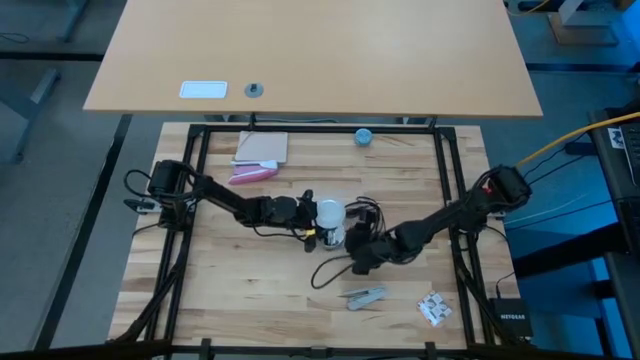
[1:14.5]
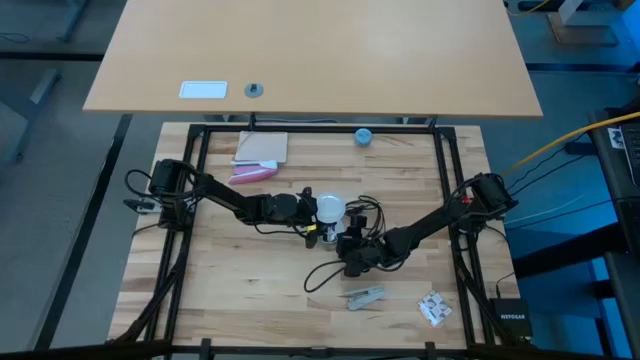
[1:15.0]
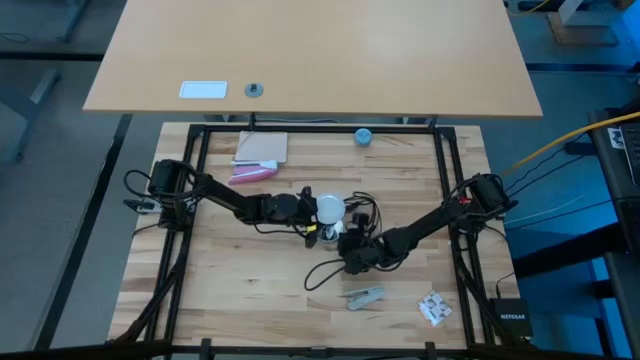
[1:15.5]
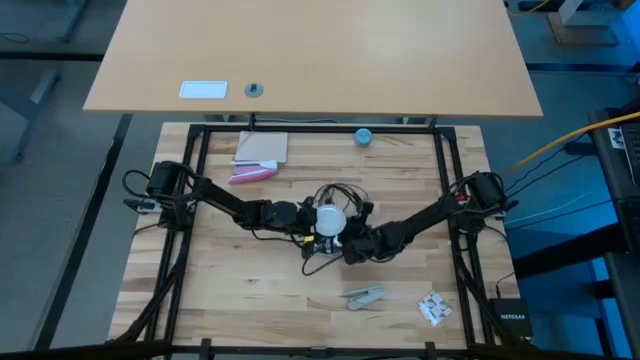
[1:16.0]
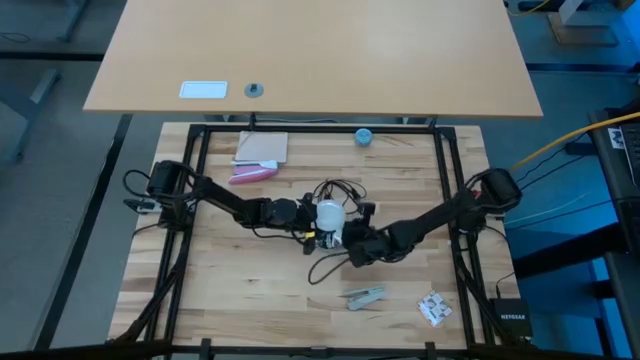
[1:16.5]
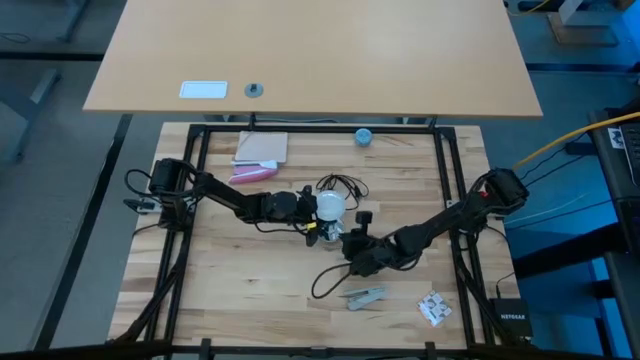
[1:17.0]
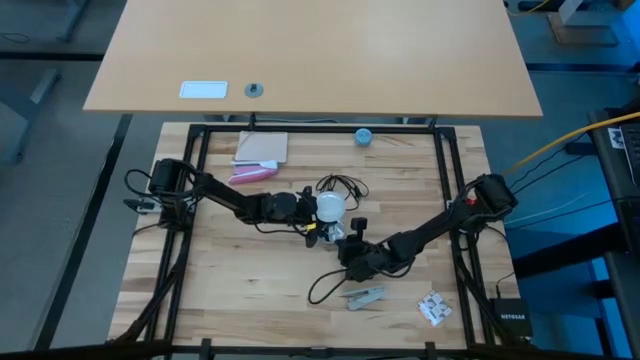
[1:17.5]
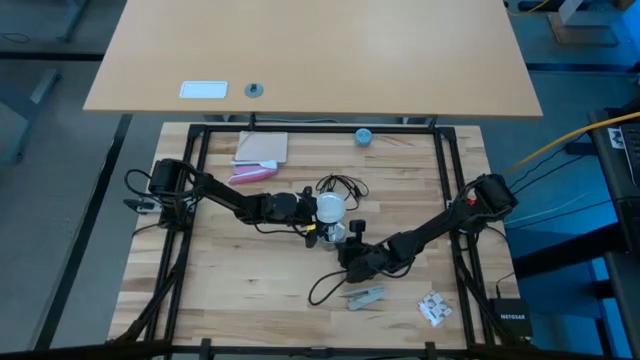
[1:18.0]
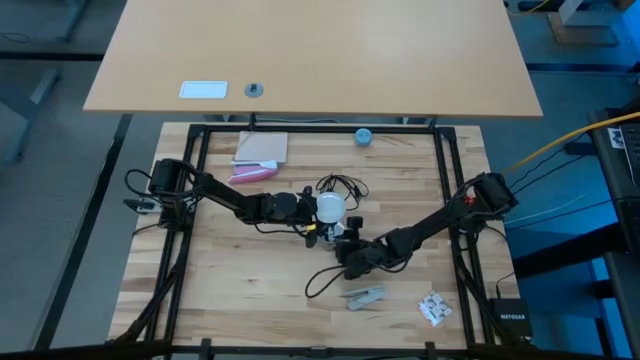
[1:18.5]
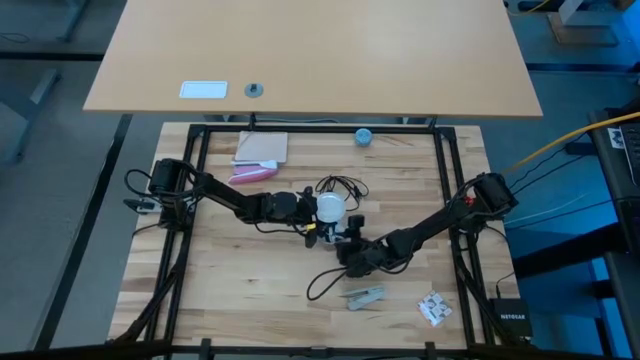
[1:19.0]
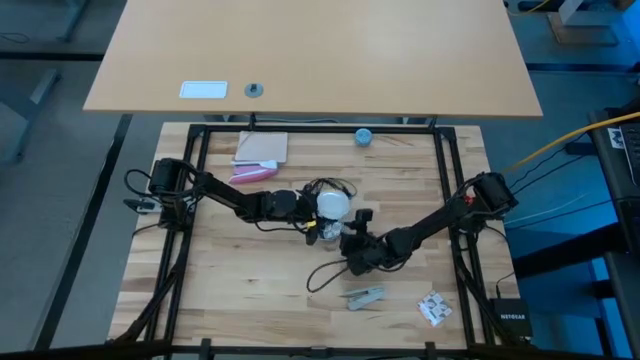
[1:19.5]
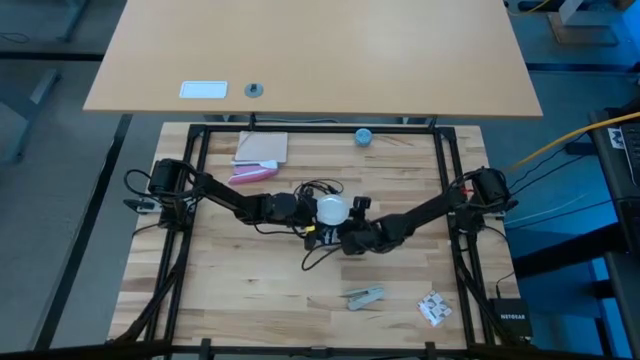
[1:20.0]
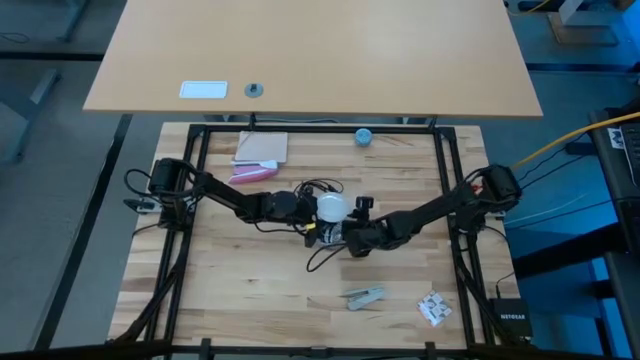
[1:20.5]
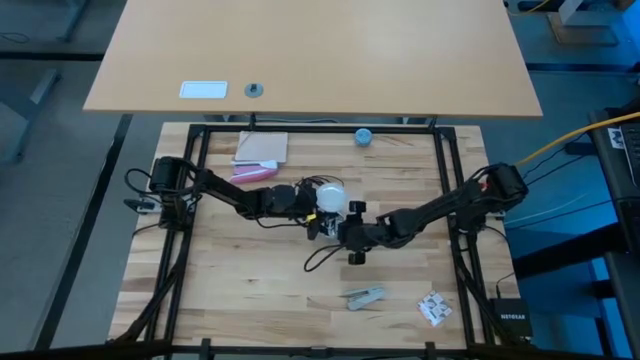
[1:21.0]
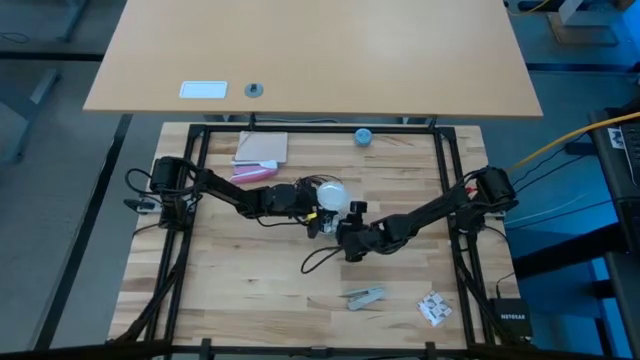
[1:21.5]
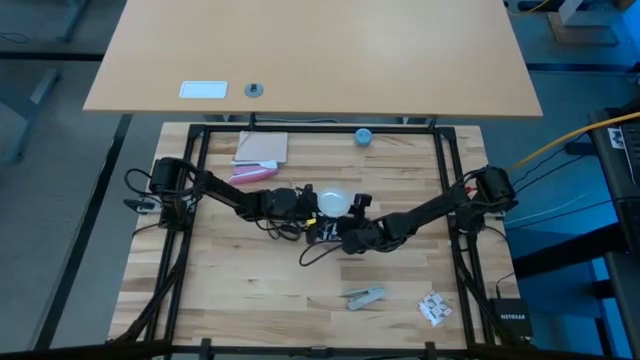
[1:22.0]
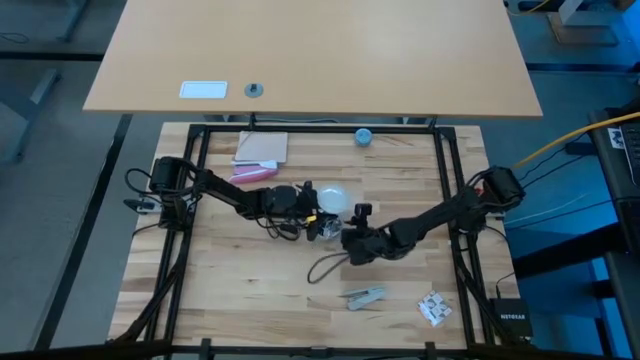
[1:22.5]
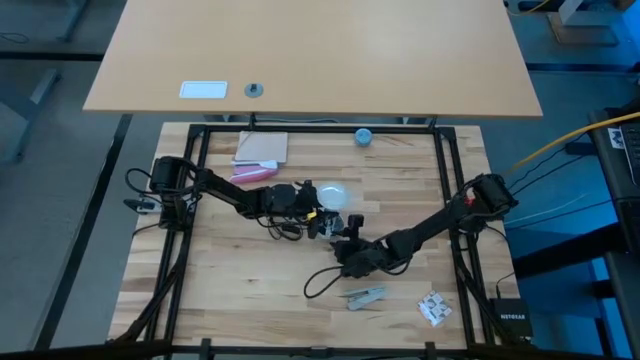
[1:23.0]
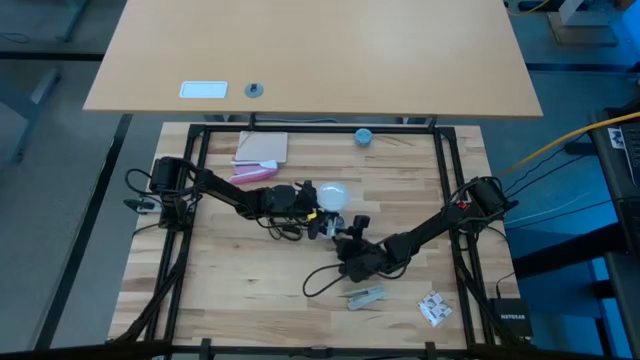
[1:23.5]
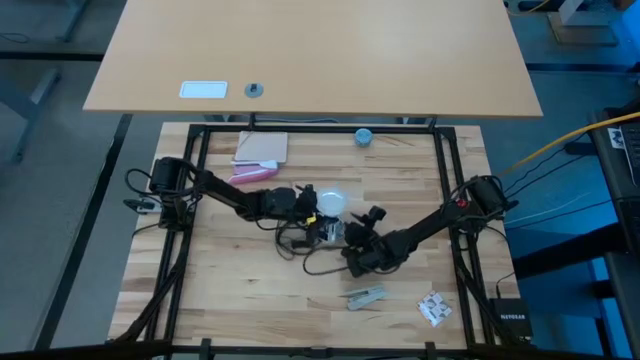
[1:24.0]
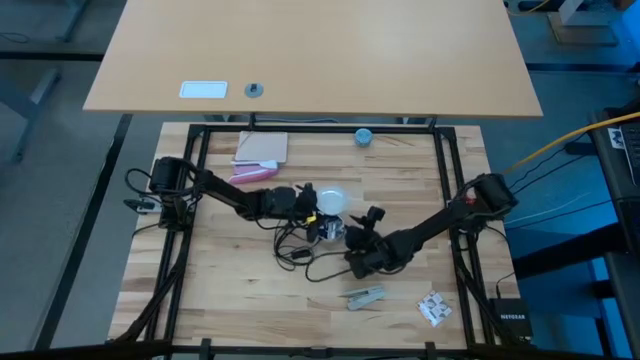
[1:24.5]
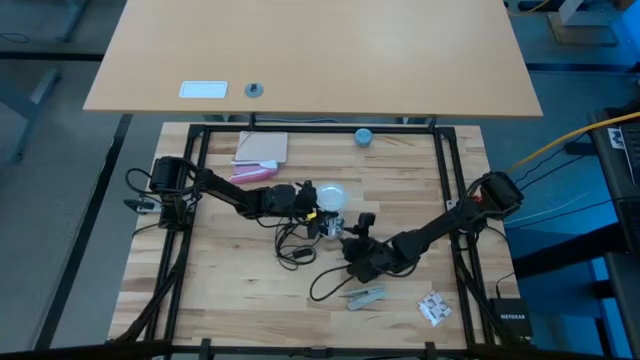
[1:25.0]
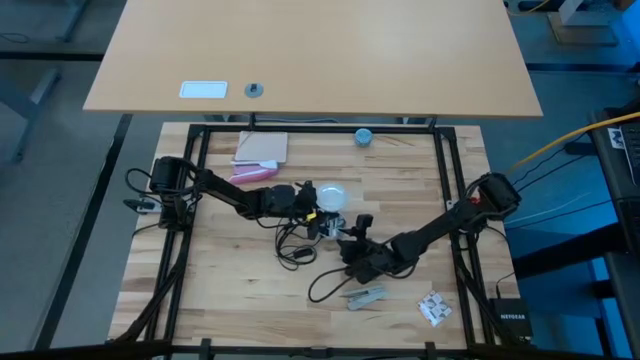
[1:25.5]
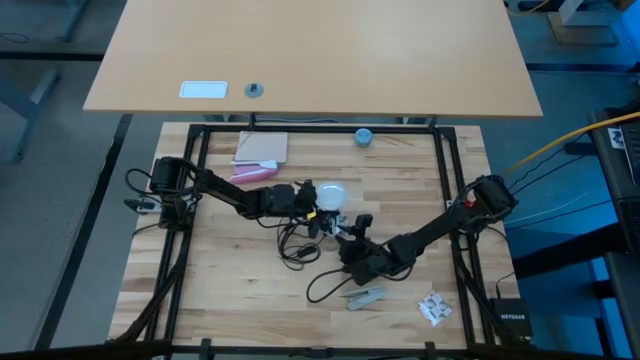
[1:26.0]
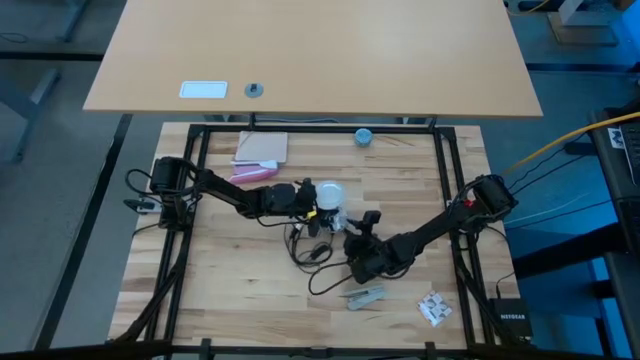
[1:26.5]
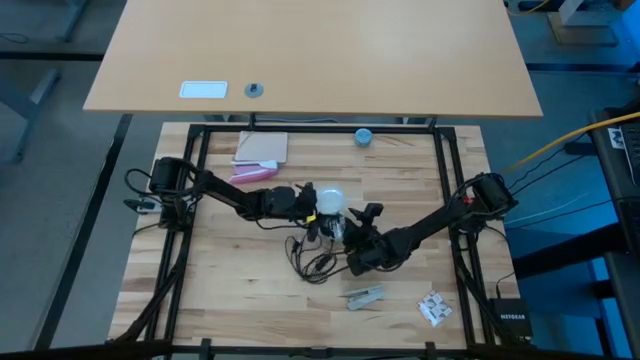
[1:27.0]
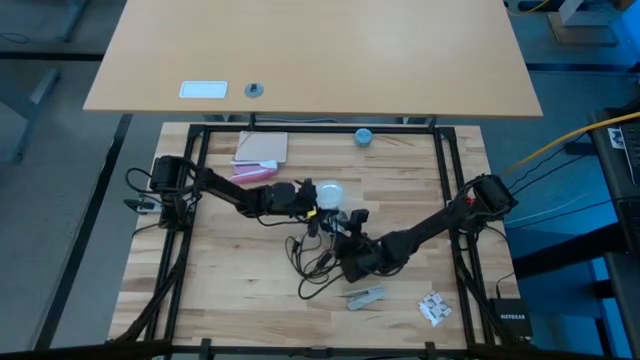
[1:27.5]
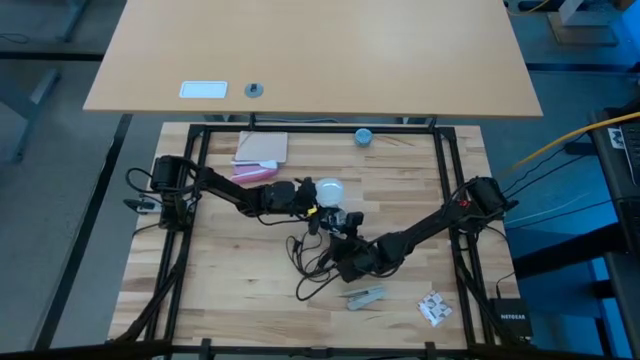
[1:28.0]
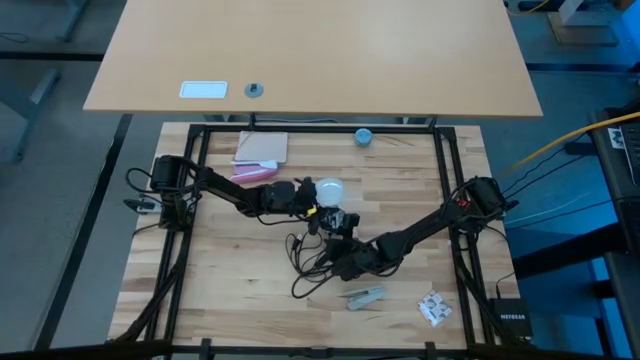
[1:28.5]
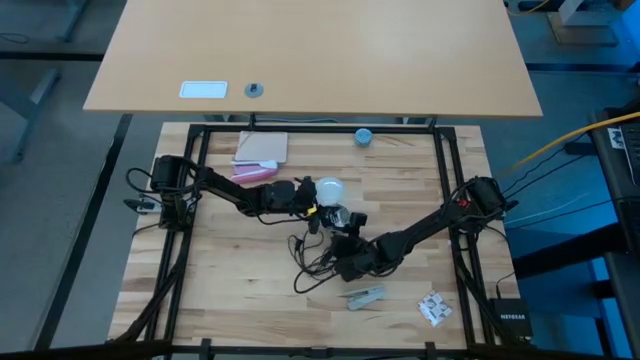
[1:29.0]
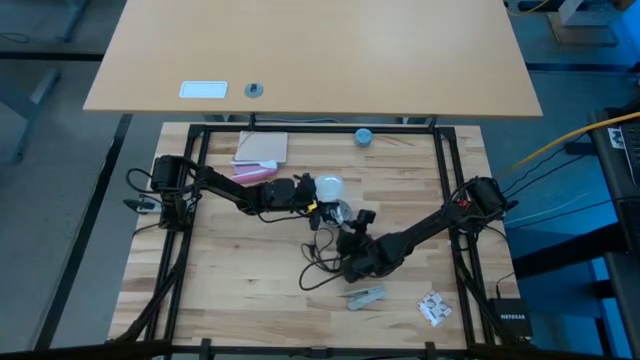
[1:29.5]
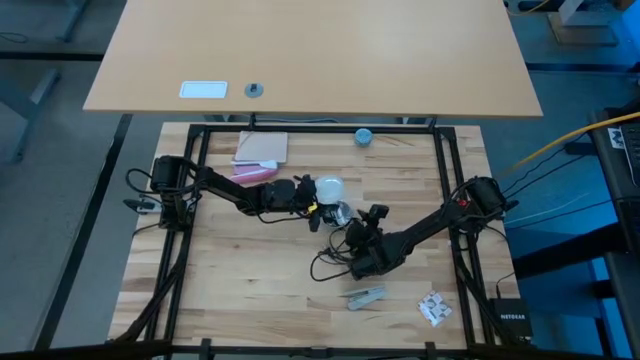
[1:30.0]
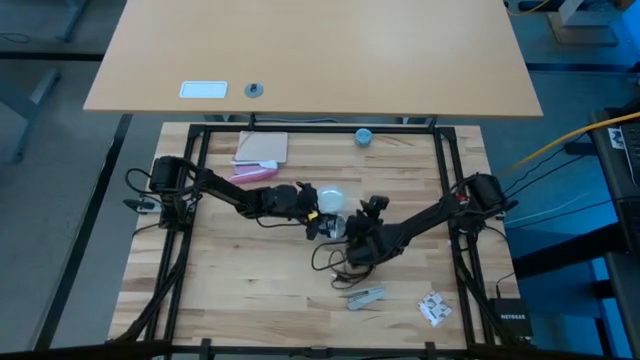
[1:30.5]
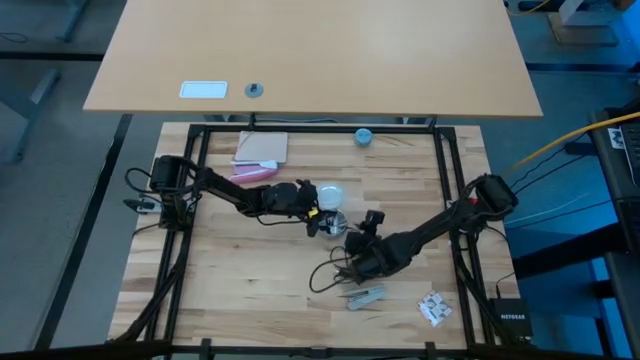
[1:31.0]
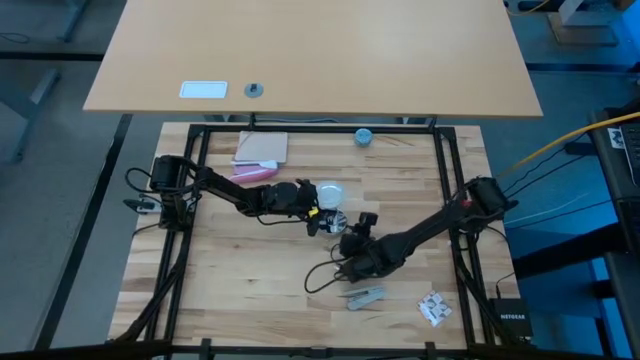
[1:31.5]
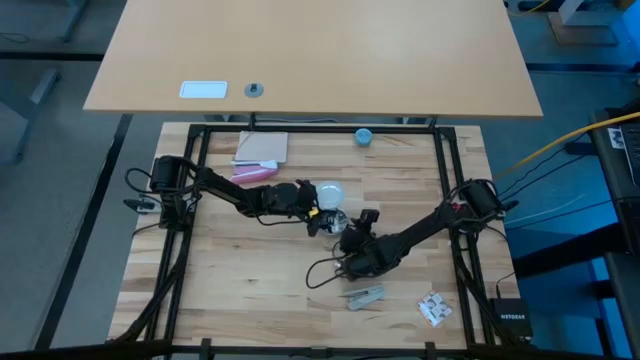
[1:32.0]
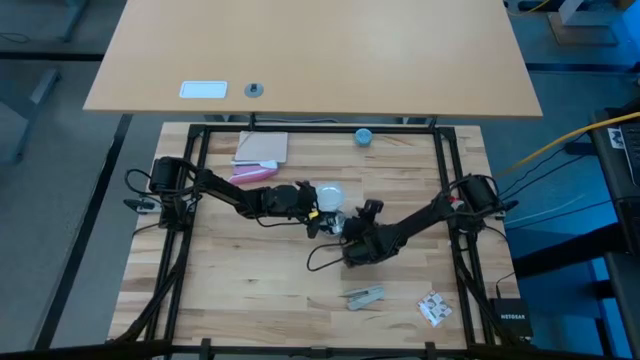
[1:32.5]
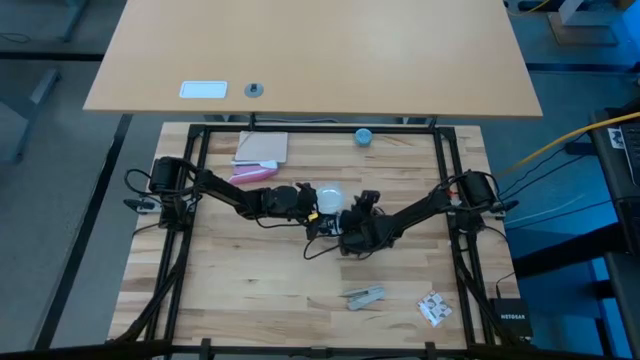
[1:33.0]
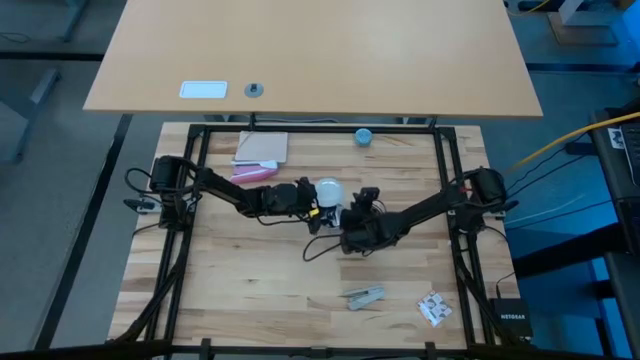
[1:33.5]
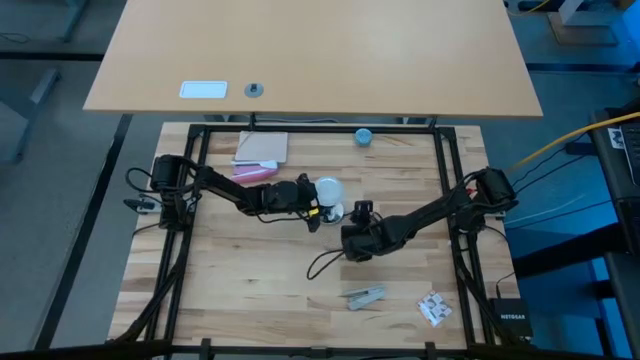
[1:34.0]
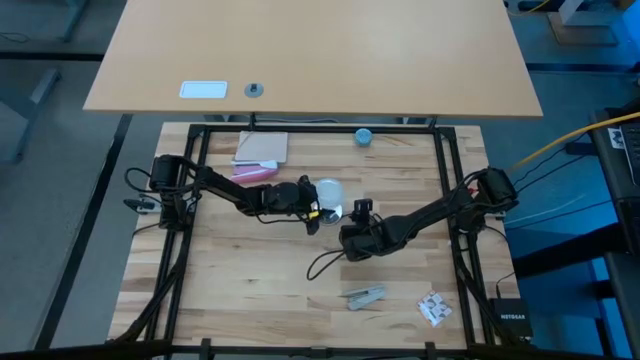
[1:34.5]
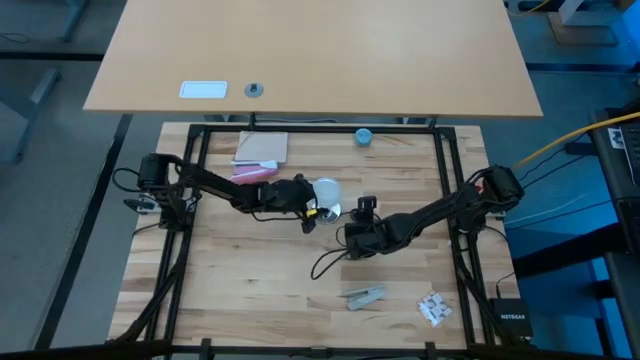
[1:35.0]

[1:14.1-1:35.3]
Task: Screw lightbulb
Insert the lightbulb into the lamp
